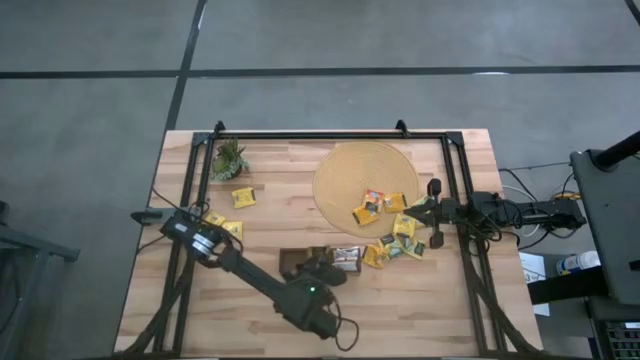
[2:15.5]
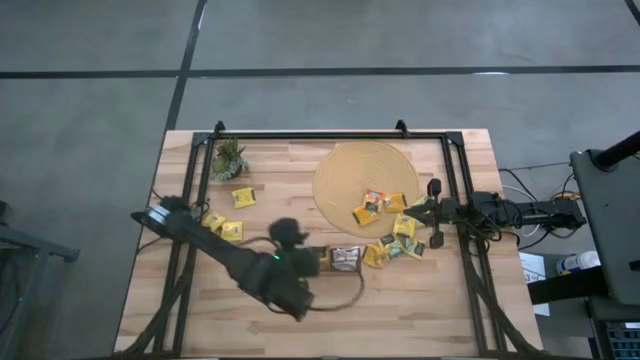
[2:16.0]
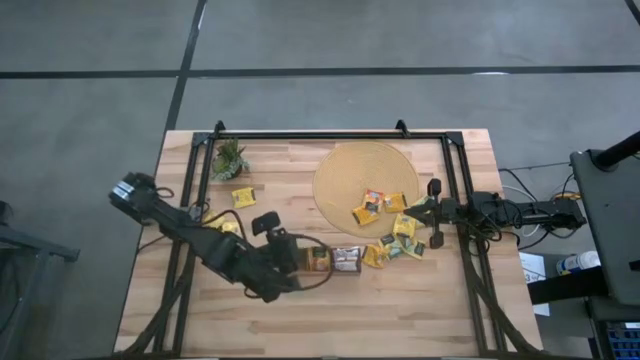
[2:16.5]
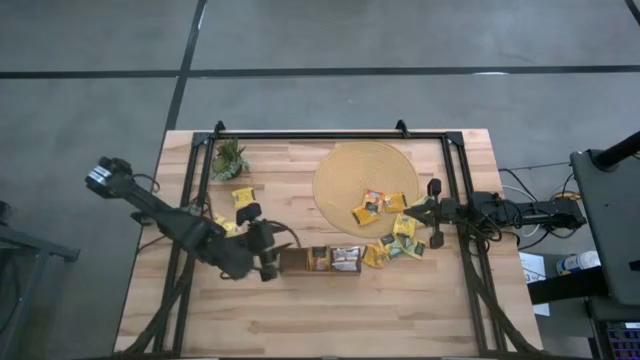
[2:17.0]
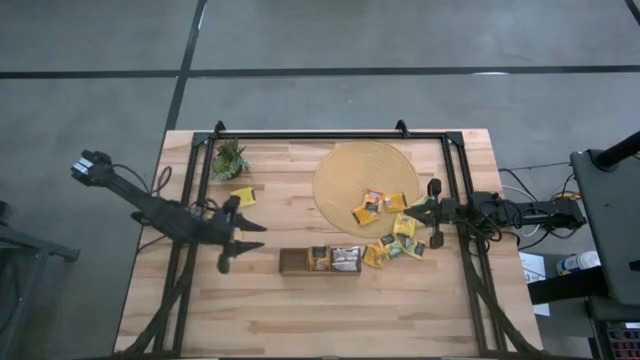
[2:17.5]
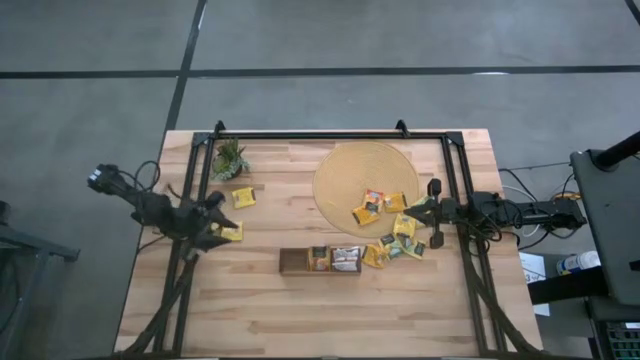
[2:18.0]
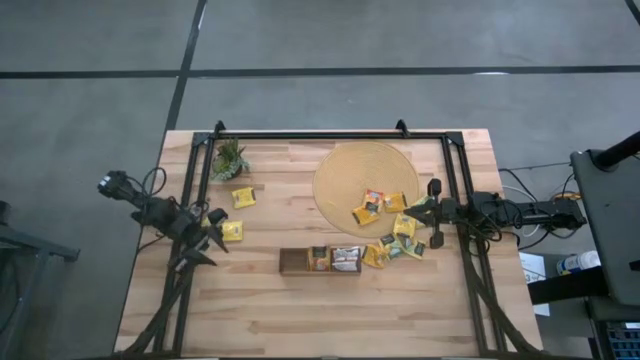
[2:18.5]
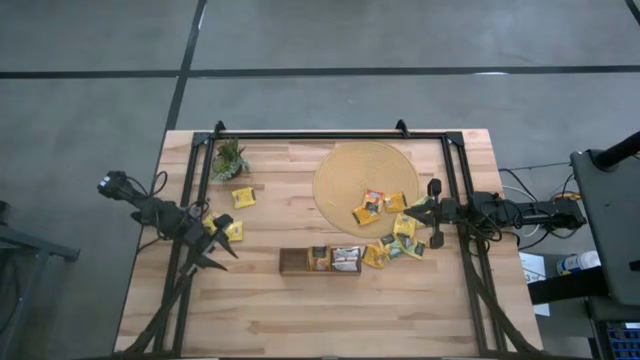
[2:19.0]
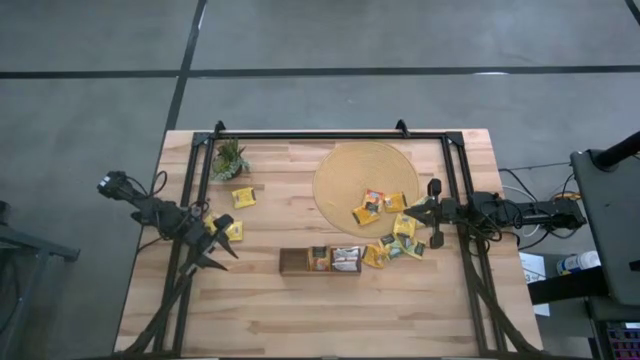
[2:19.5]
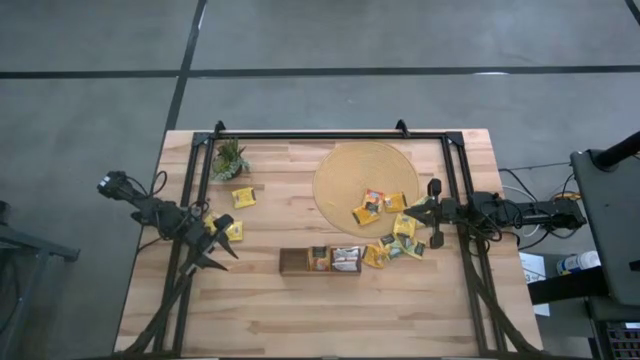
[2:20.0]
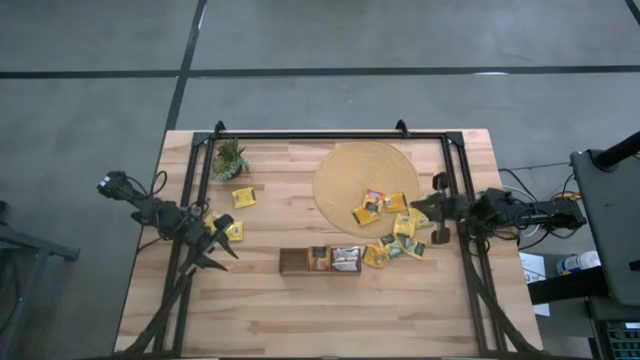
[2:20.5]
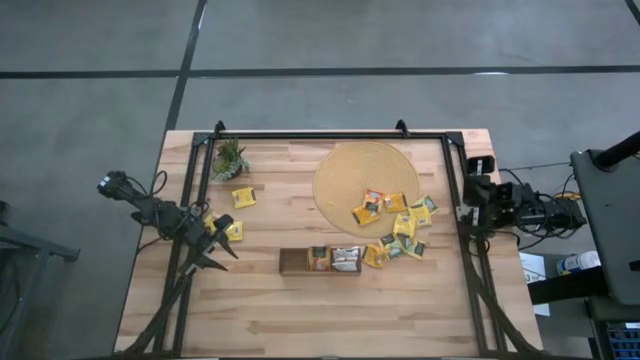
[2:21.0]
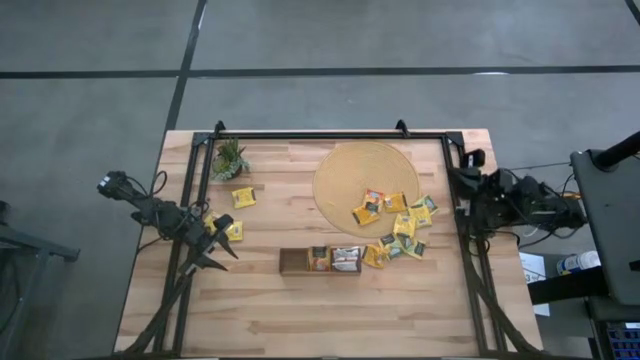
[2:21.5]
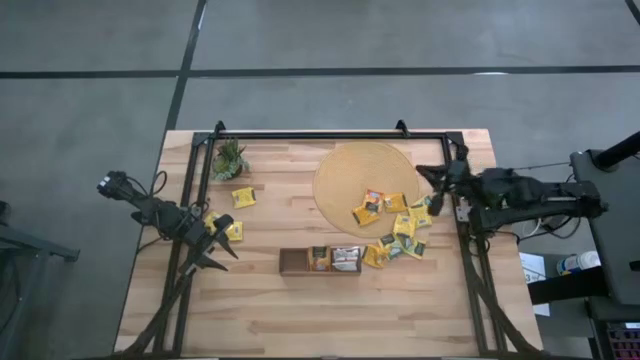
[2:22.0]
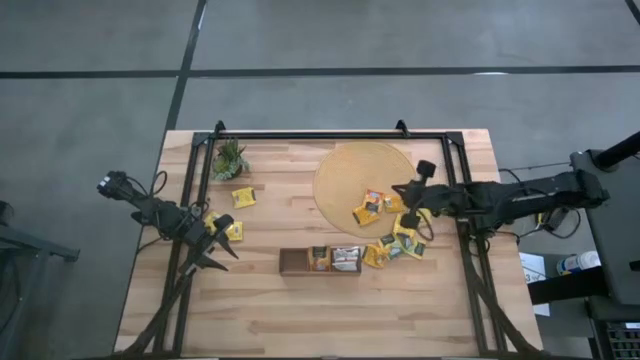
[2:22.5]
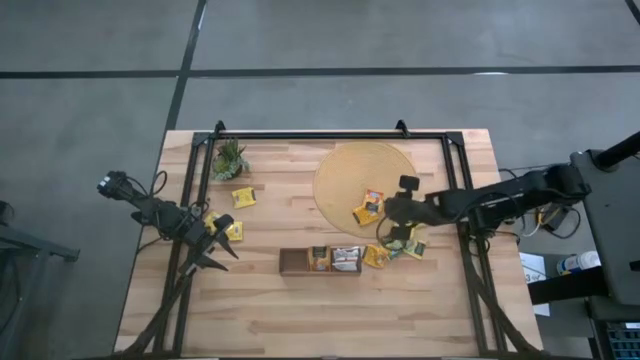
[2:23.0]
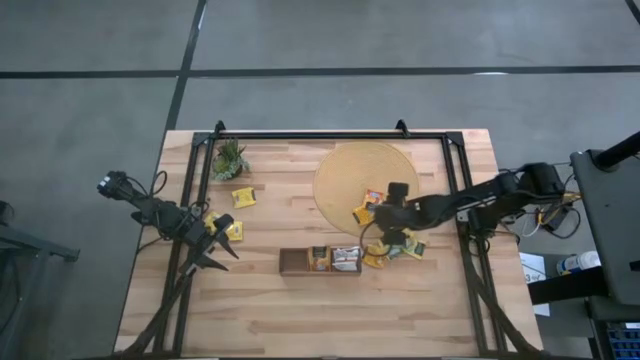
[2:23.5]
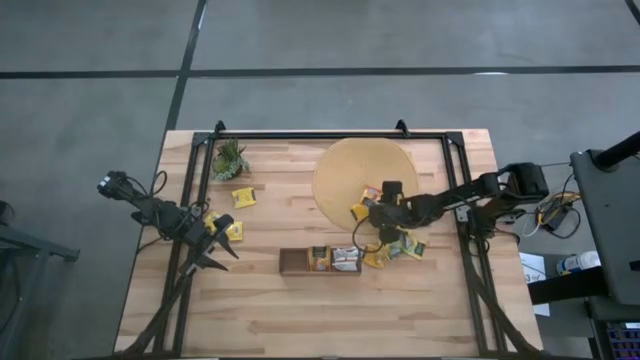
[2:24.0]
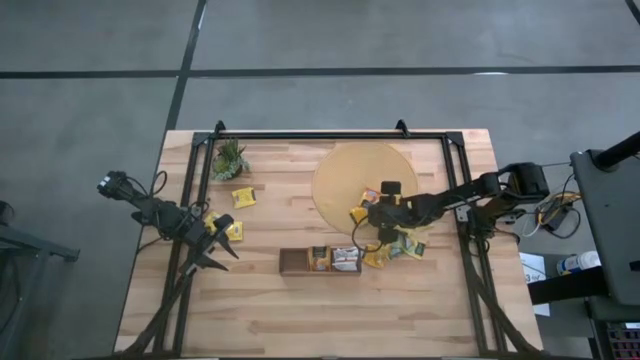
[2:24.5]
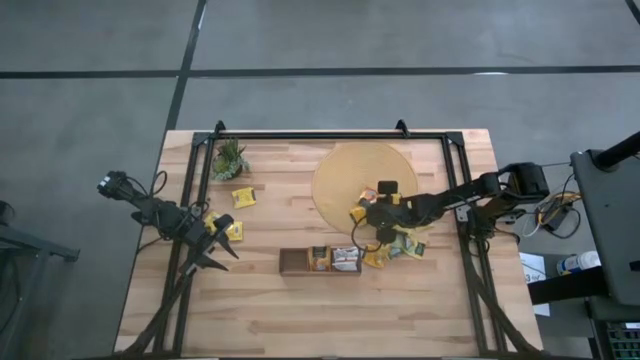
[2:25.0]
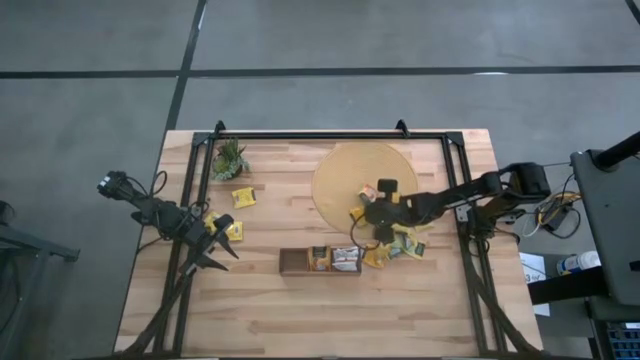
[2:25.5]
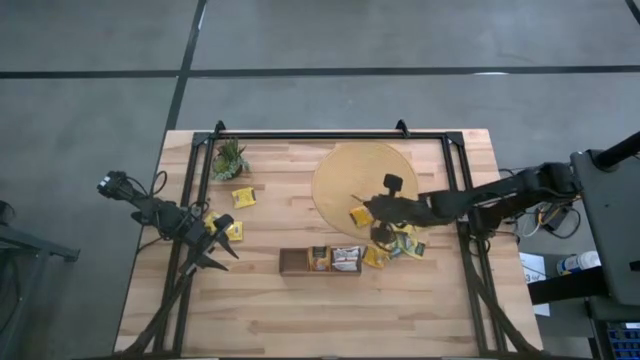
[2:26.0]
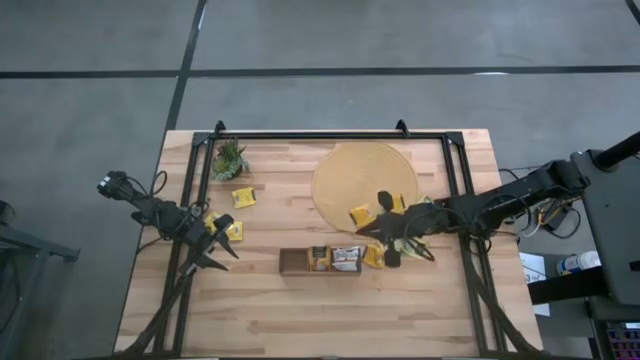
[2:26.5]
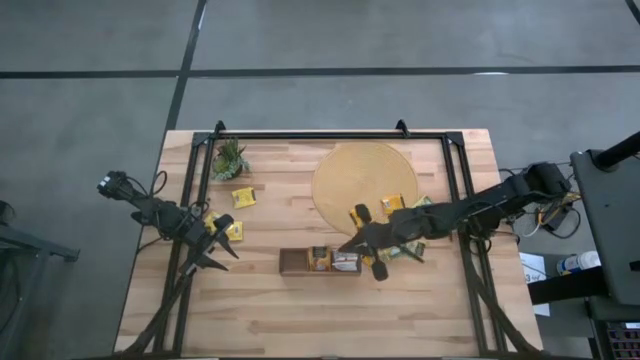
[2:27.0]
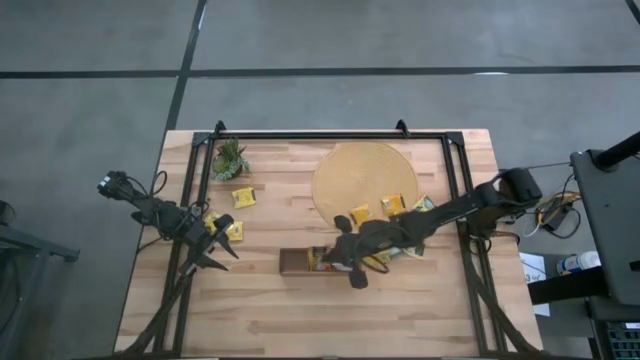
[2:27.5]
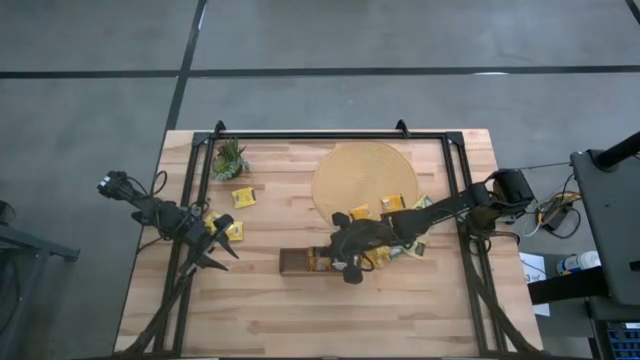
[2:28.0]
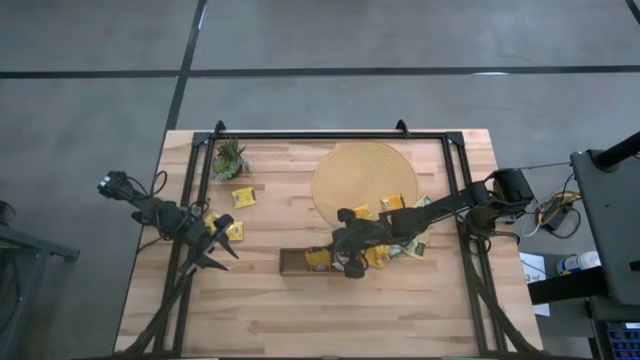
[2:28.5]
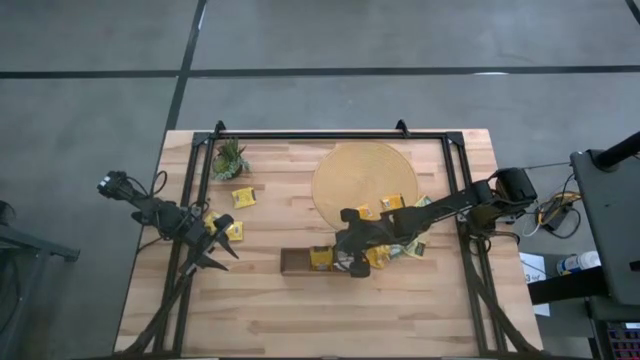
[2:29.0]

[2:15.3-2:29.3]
Task: Pick & Place Tea
Put the orange tea bag into the middle section of the wooden organizer

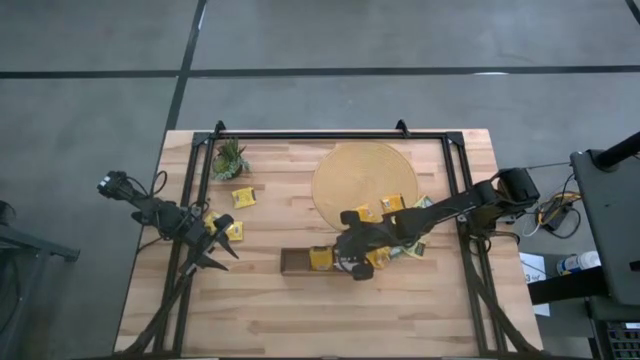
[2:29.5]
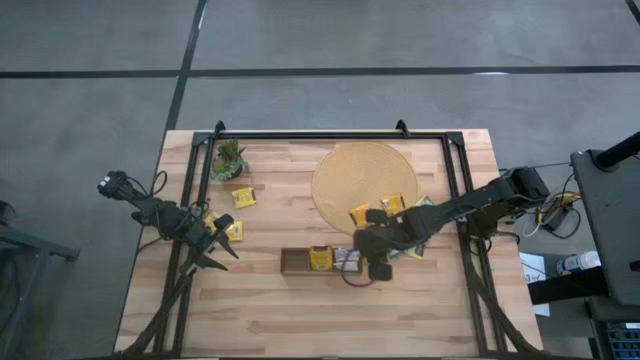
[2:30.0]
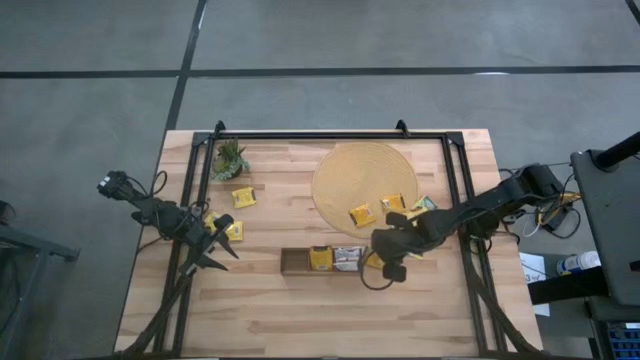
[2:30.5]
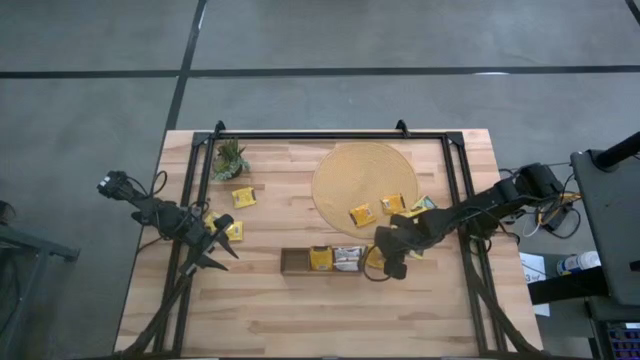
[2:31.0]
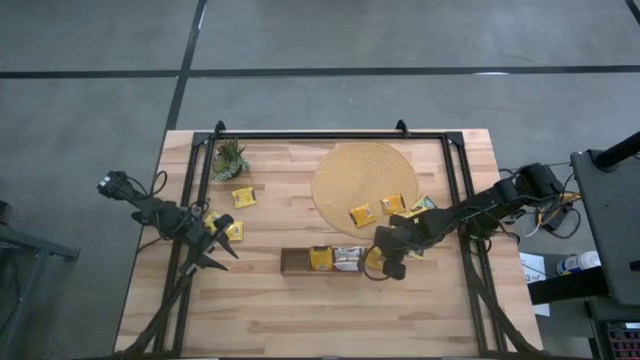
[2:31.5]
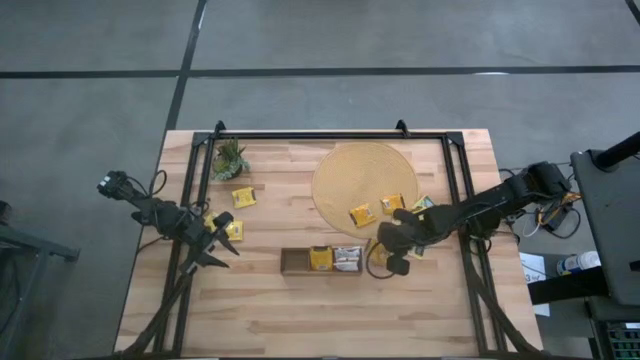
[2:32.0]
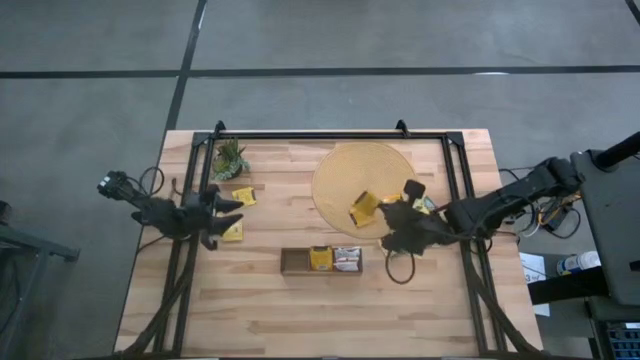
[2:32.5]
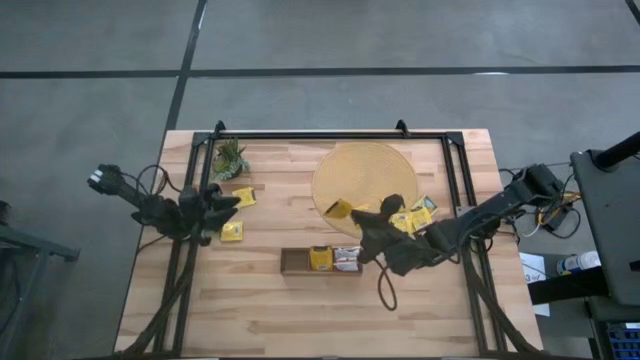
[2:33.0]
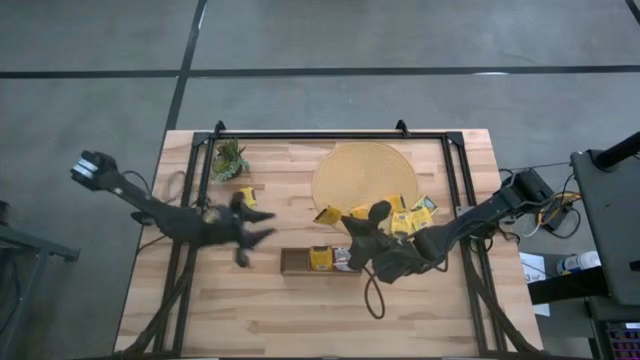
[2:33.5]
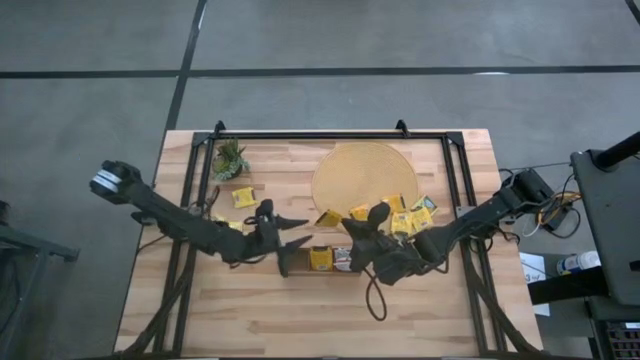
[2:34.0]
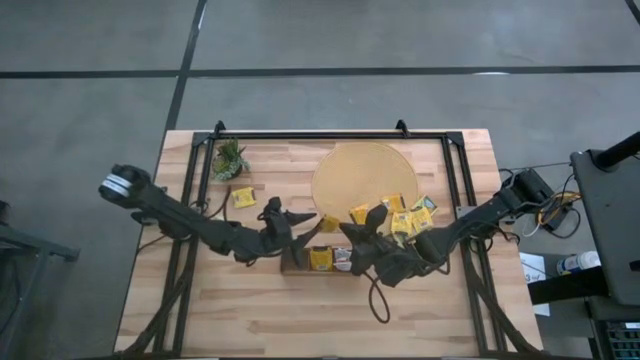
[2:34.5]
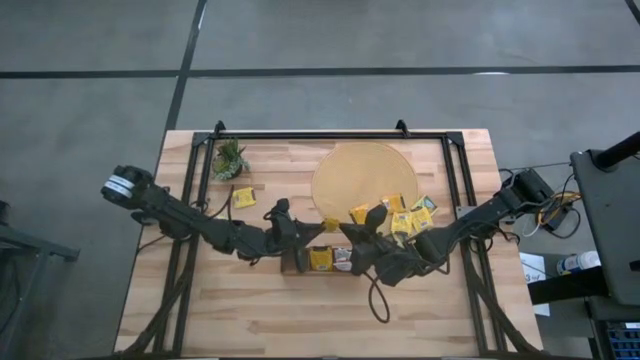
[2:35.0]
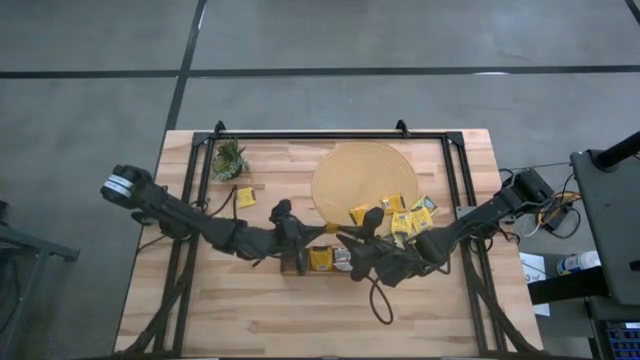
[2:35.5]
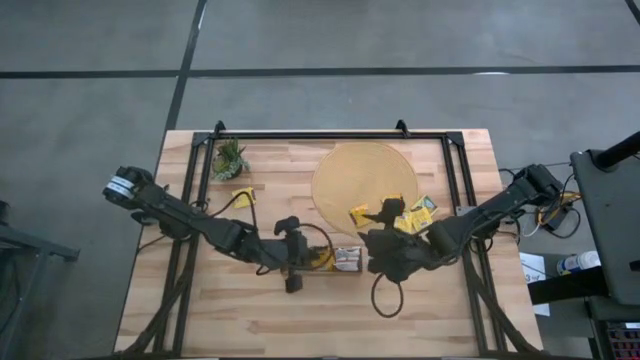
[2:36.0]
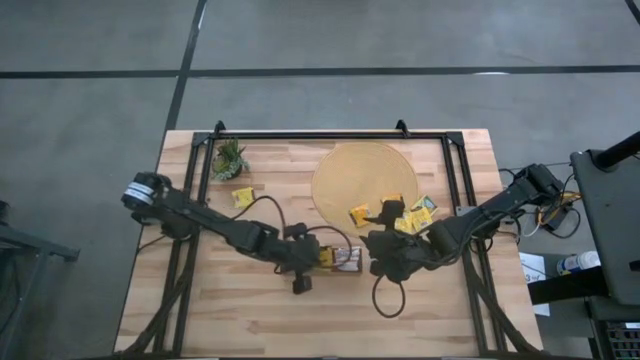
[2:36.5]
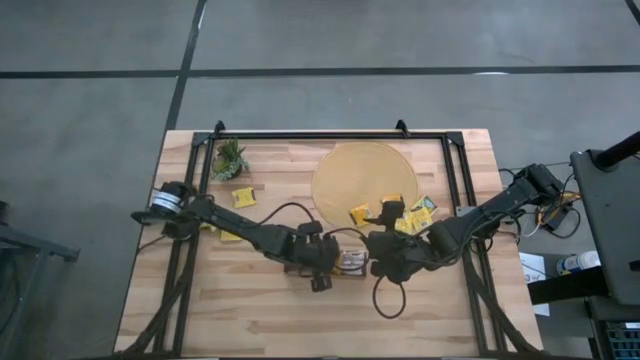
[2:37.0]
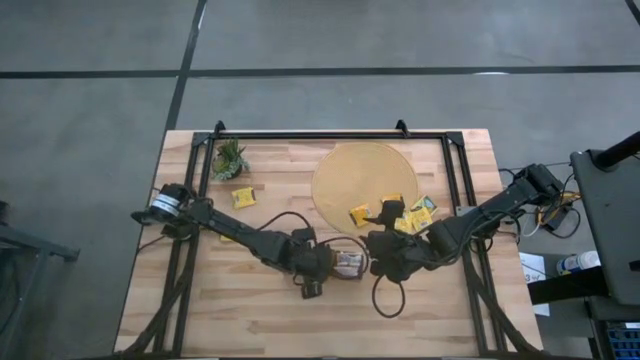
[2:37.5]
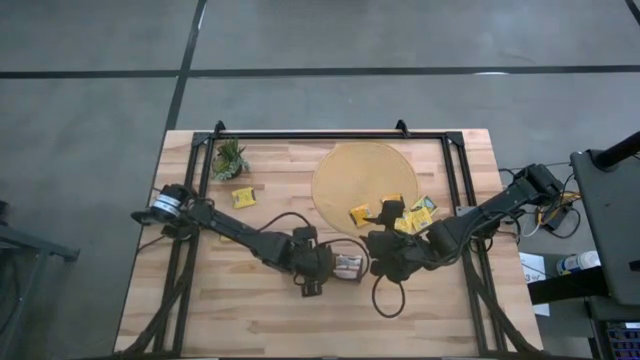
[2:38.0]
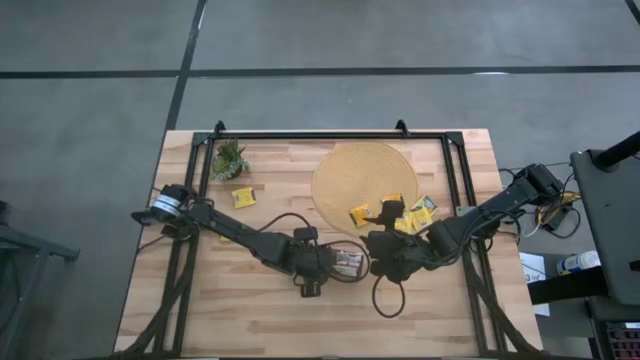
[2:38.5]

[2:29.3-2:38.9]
Put the orange tea bag into the middle section of the wooden organizer
